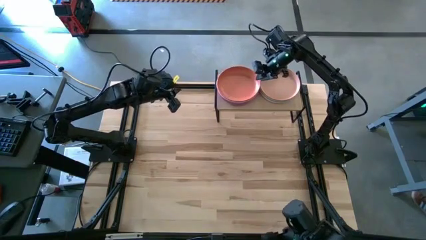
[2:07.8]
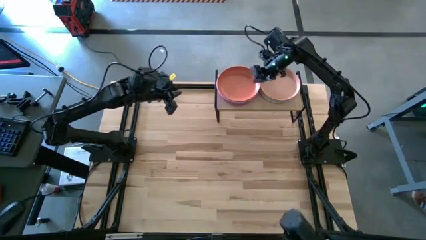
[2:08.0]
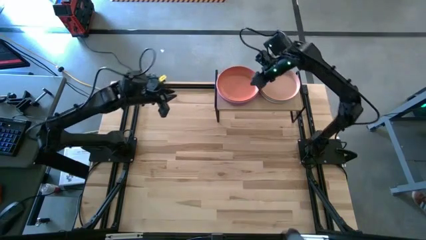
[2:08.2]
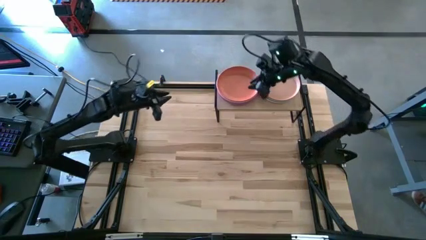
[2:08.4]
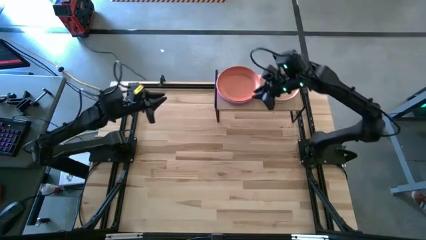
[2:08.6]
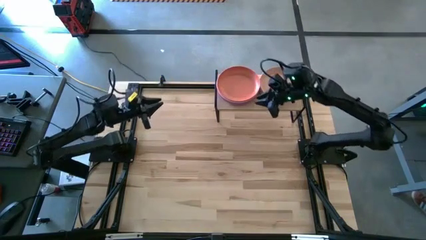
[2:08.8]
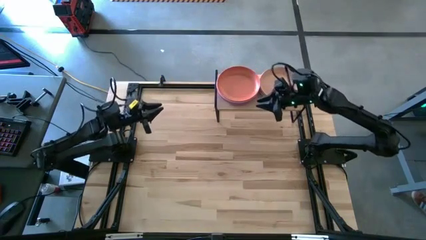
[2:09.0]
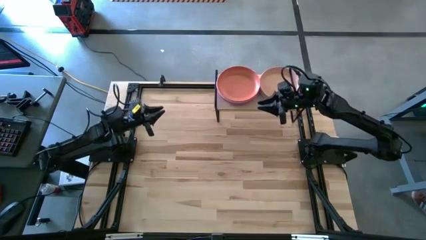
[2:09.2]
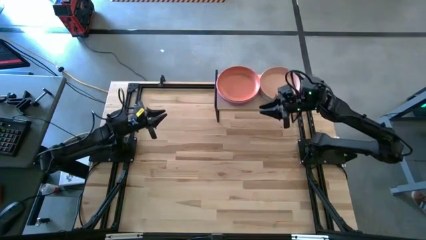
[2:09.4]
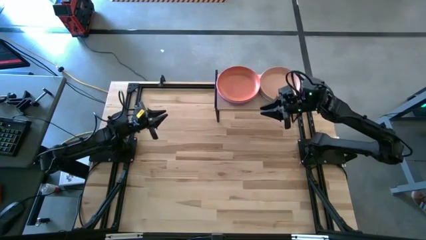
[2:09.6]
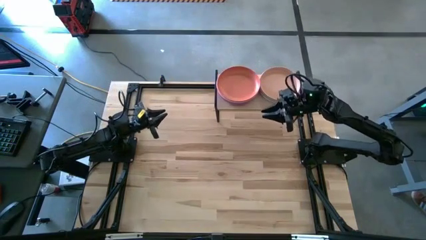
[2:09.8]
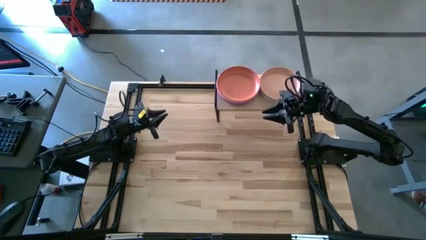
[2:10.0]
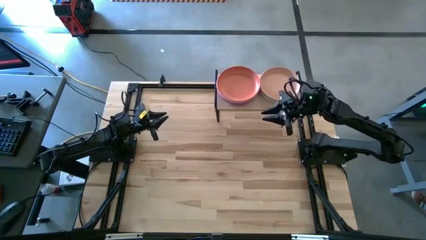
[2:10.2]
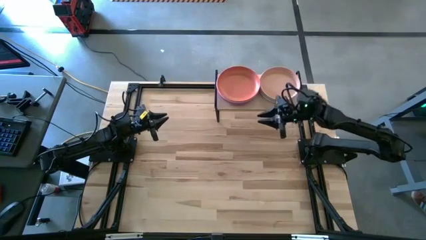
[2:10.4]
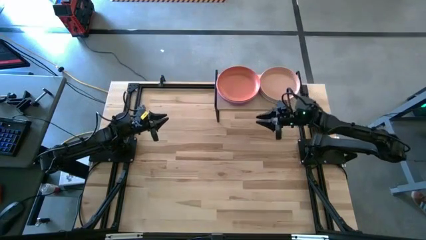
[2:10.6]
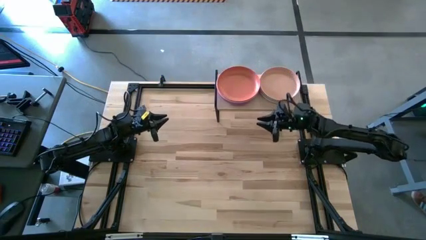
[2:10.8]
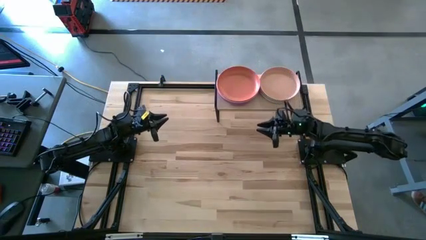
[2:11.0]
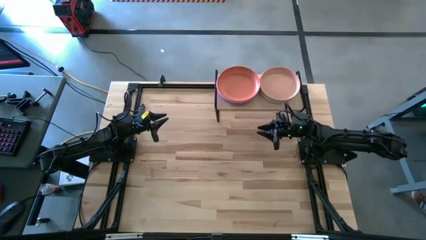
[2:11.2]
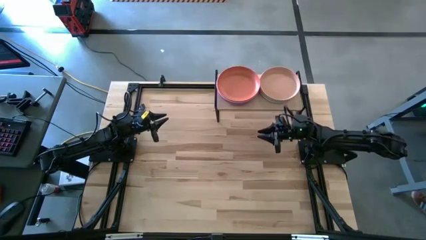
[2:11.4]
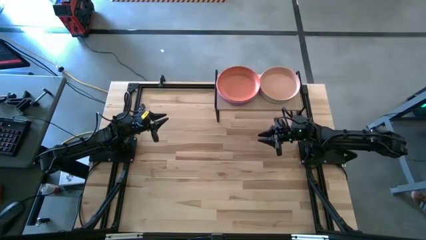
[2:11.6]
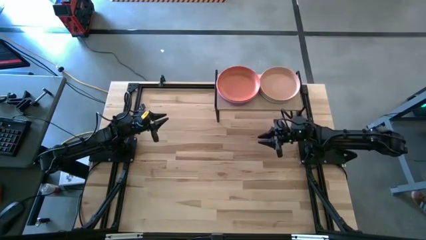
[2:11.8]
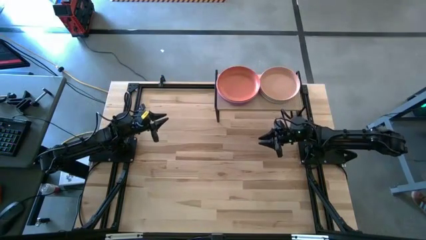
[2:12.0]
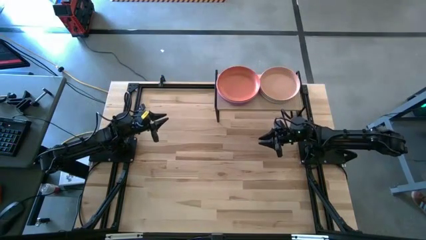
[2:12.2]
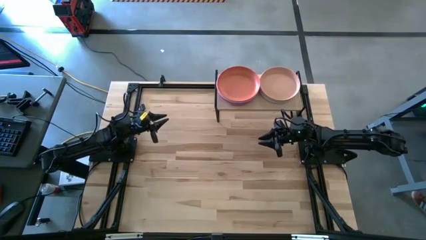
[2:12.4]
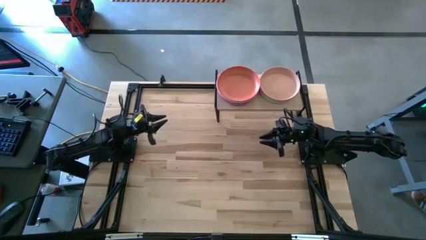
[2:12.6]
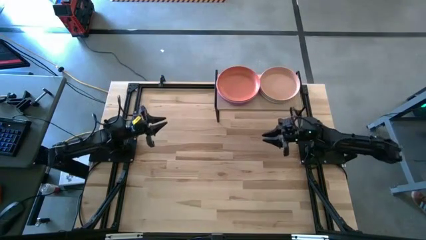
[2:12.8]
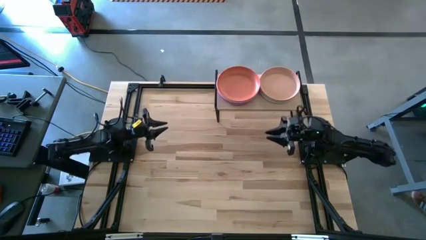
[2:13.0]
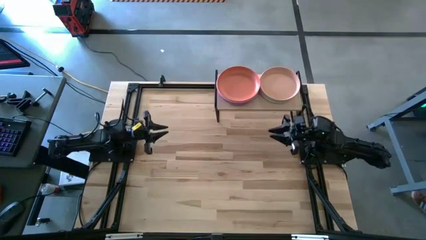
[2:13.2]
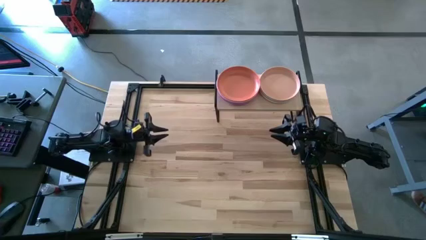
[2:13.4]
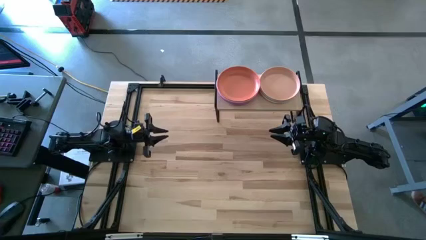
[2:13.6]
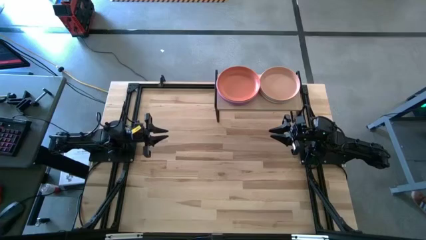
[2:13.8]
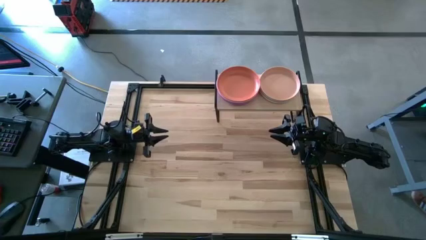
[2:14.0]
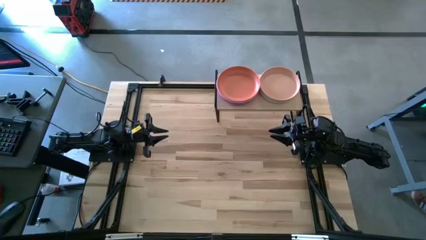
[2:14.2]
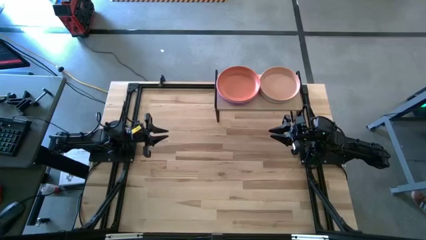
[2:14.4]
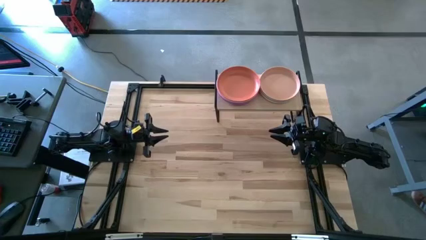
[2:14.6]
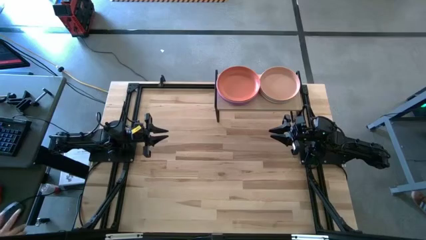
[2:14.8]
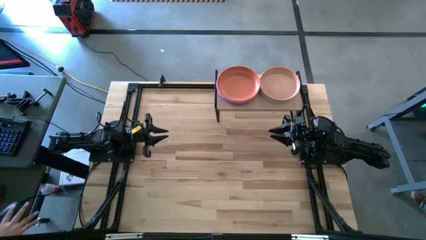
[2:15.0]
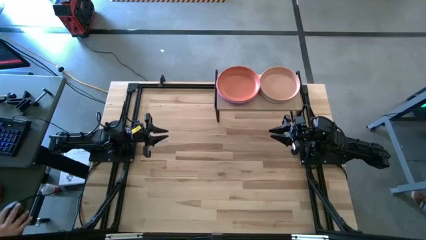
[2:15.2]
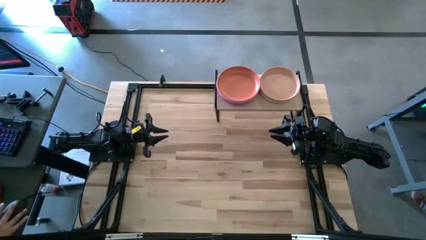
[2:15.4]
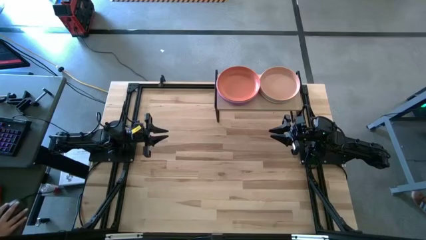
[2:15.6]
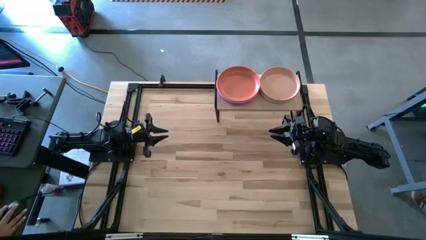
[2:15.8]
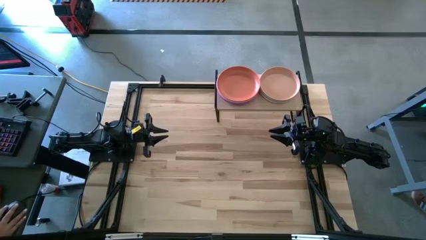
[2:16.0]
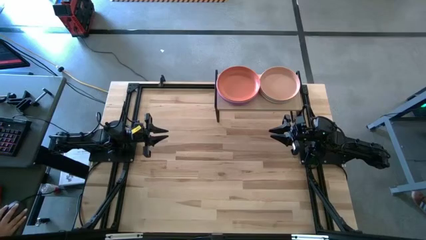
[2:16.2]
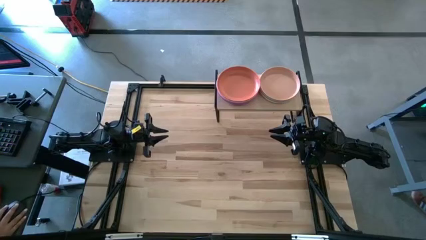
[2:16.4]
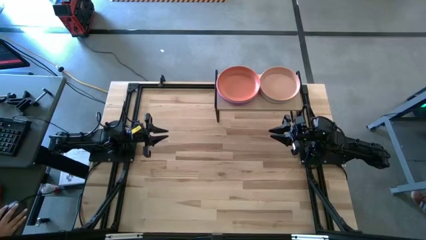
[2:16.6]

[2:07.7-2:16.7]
Task: Place and stack plates onto a shelf
Return to Home Position

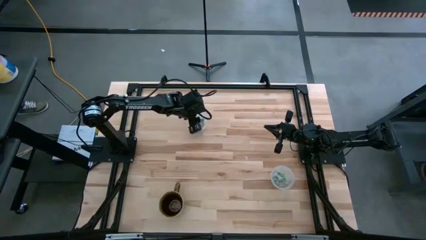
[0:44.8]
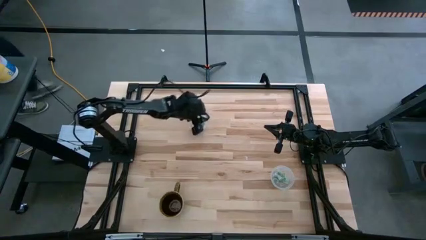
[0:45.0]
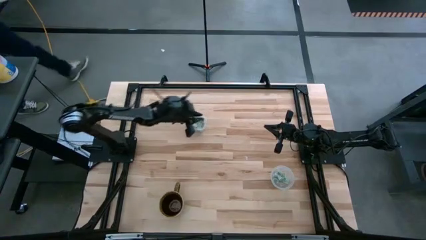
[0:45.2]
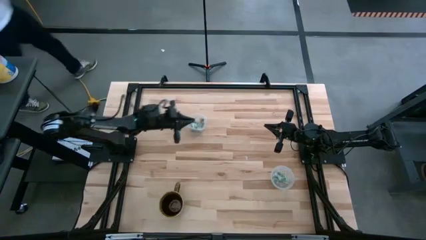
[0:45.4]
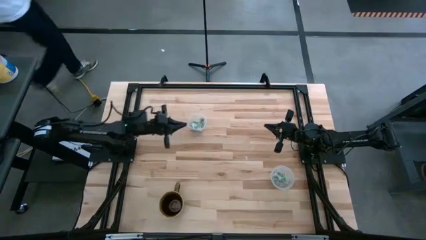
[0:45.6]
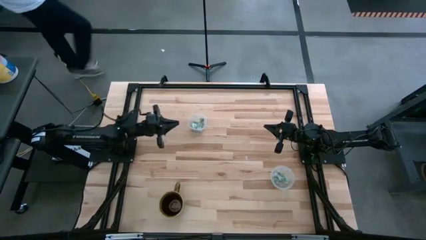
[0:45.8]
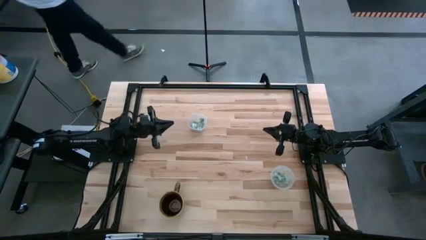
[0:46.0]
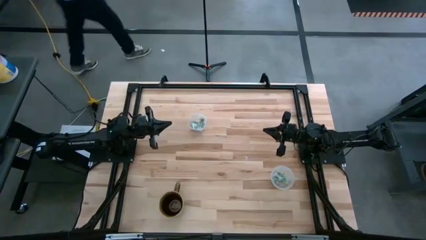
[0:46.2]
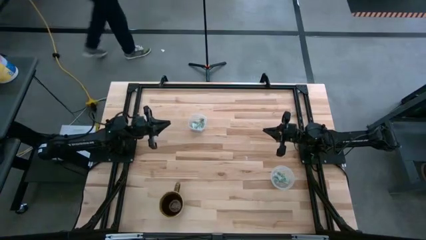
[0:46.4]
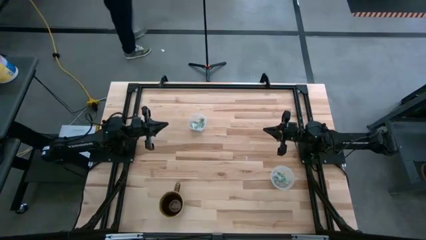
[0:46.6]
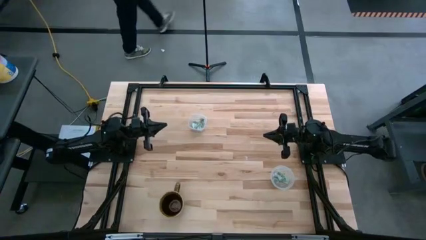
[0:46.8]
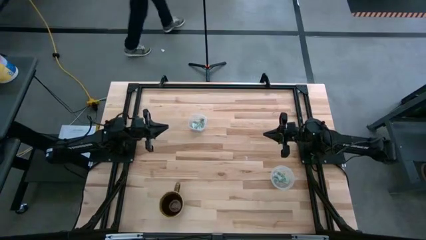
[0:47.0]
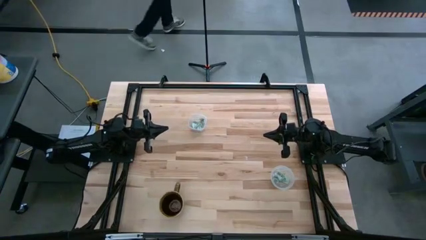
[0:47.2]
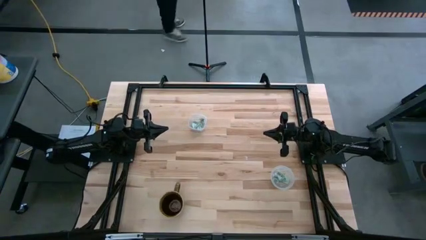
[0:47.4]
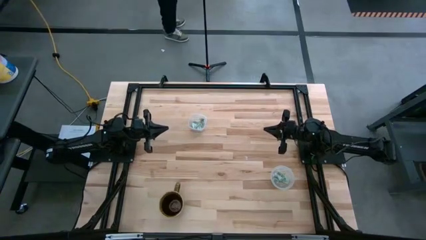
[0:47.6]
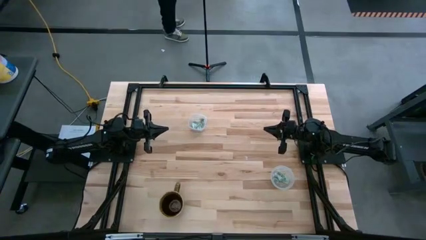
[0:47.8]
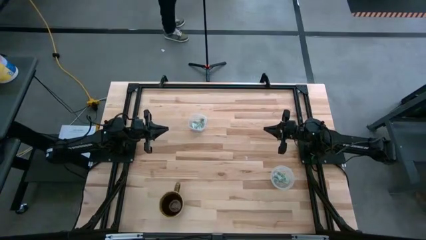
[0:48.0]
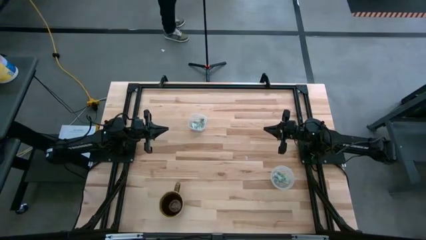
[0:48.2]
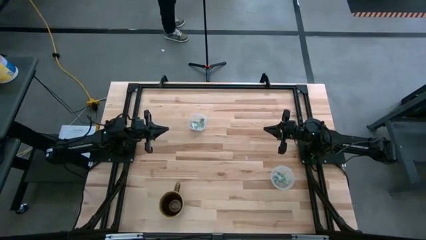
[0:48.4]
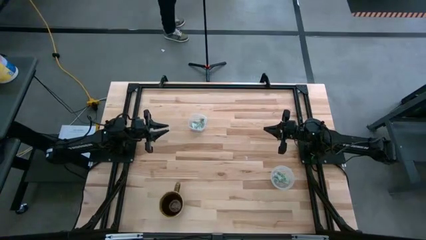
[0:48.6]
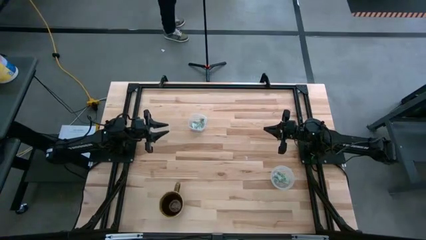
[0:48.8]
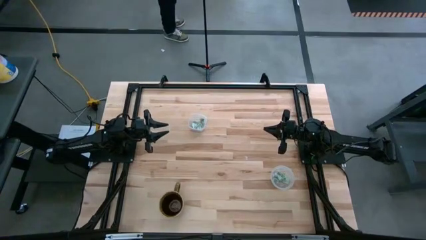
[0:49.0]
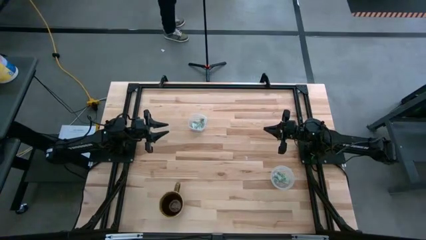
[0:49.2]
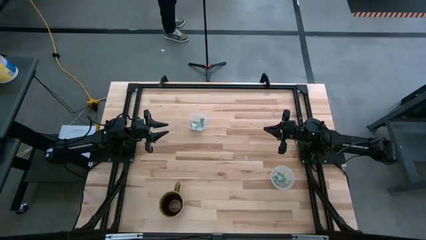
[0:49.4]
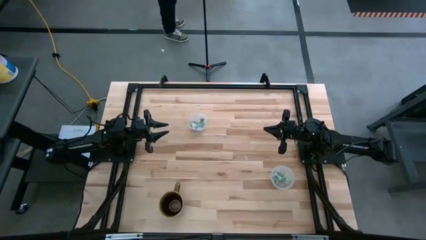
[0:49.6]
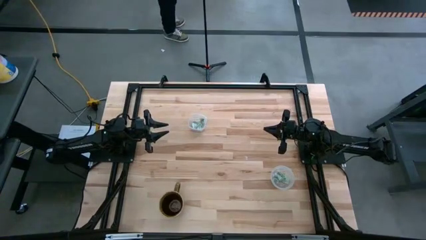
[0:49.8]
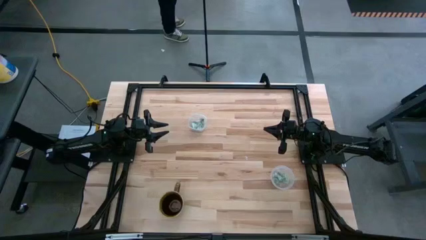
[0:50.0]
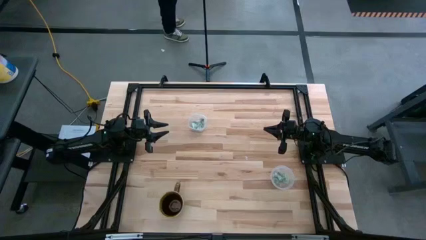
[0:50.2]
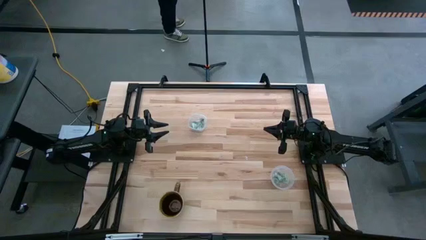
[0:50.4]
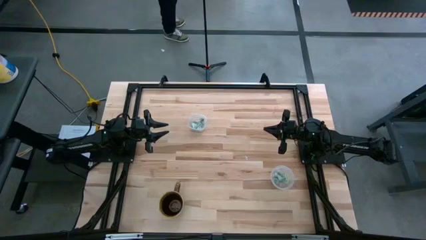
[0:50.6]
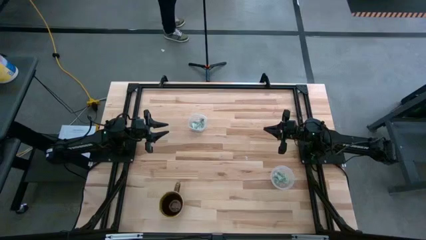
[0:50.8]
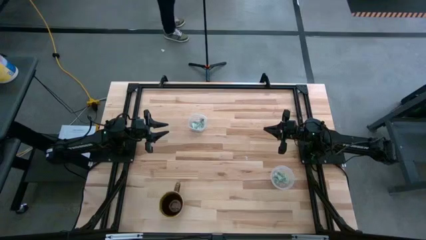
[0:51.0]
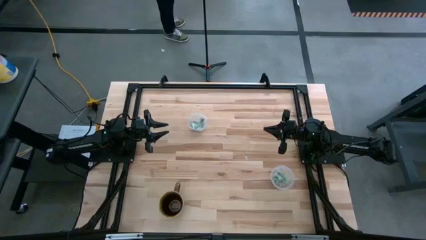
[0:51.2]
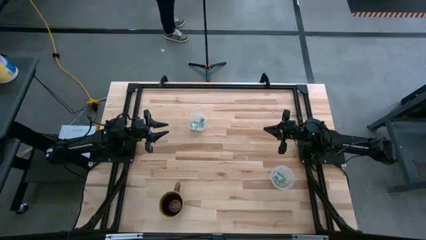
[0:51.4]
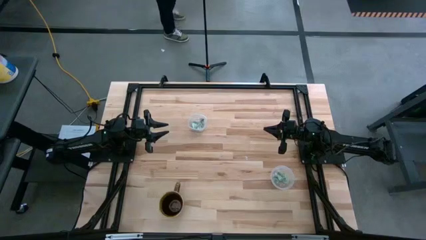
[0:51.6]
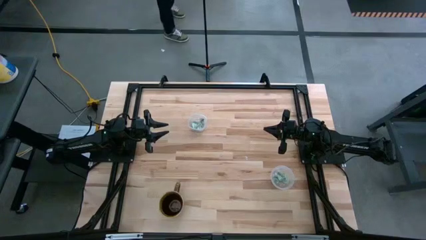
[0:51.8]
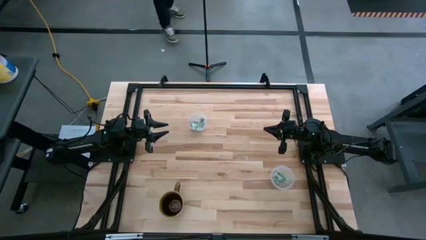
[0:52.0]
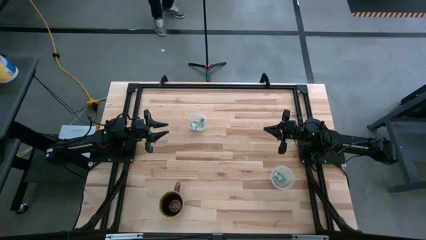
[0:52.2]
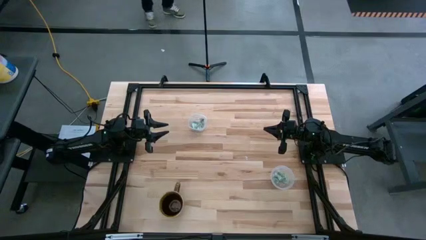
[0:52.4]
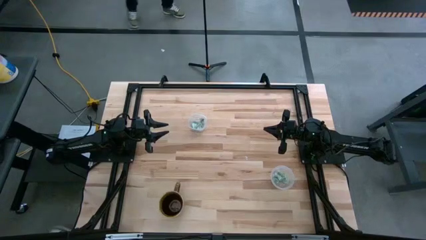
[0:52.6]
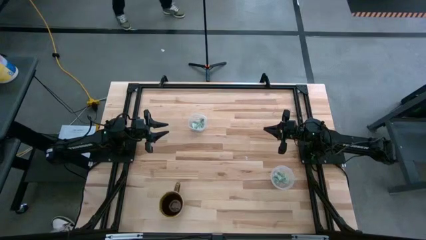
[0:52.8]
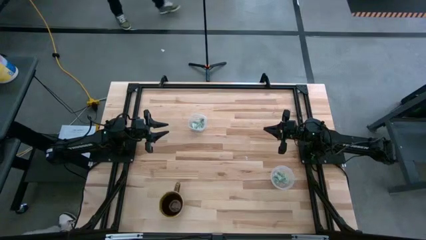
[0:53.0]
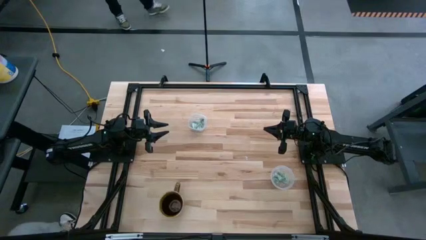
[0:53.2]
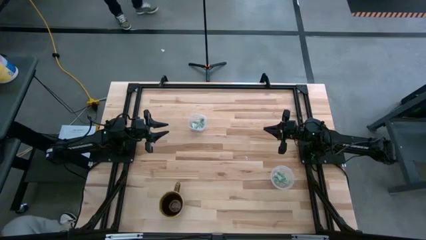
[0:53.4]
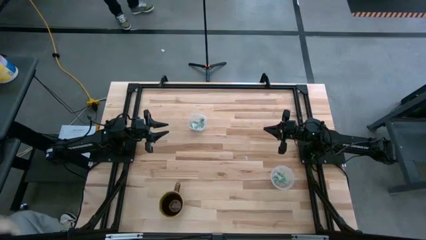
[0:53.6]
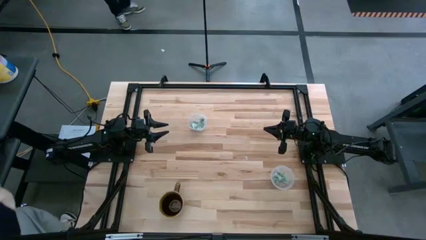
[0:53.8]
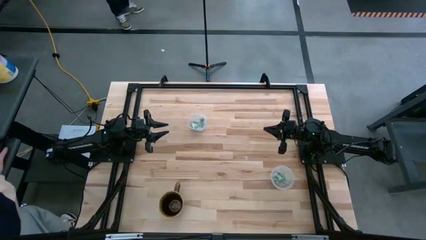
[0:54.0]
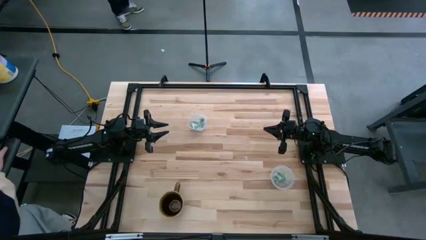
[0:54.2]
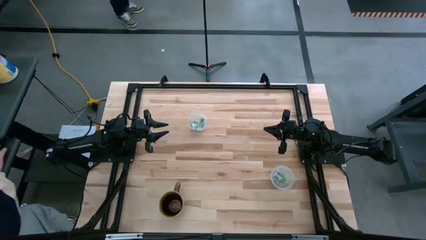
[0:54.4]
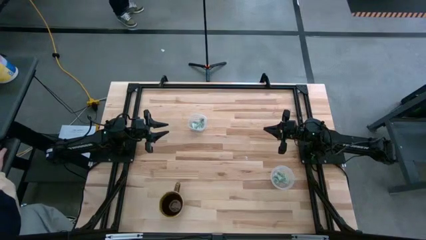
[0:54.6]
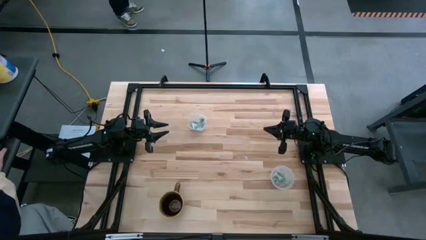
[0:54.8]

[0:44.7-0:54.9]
Task: Pick and place items into bin
Return to Home Position
